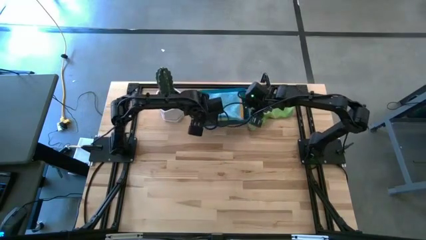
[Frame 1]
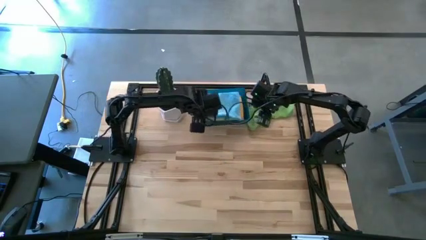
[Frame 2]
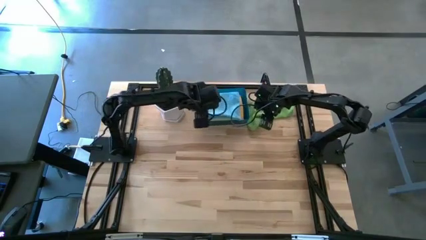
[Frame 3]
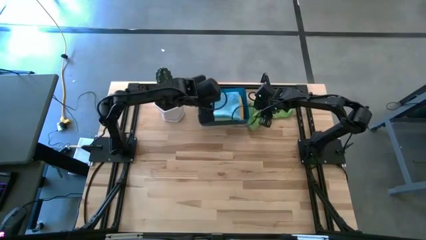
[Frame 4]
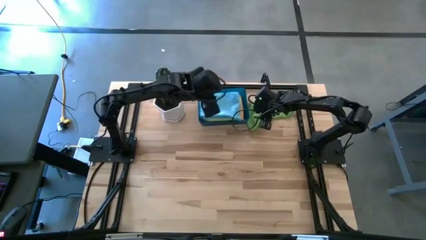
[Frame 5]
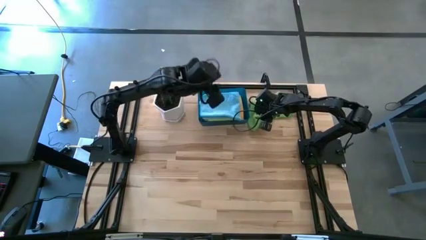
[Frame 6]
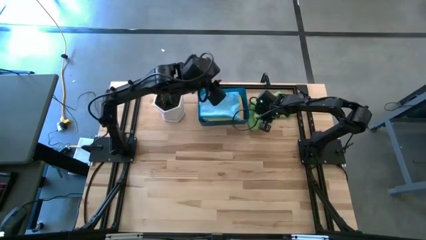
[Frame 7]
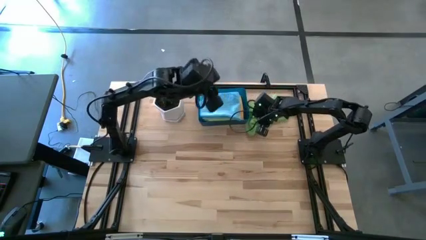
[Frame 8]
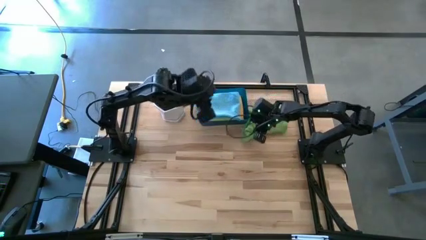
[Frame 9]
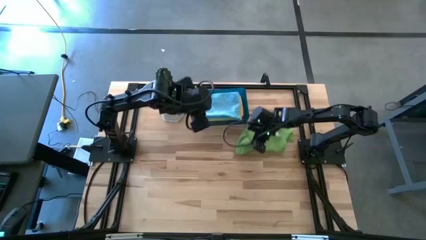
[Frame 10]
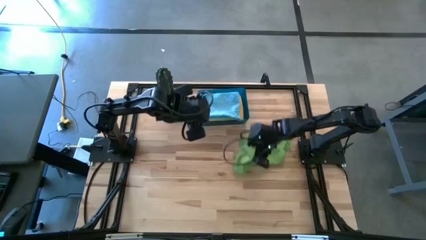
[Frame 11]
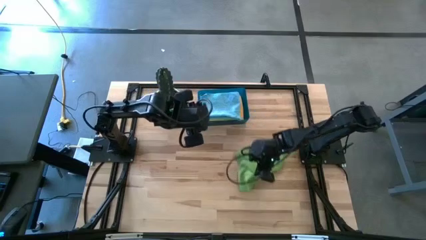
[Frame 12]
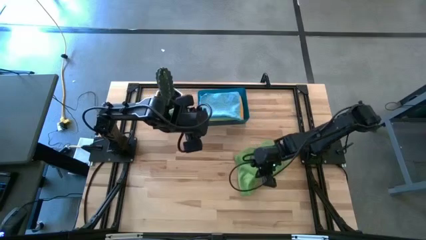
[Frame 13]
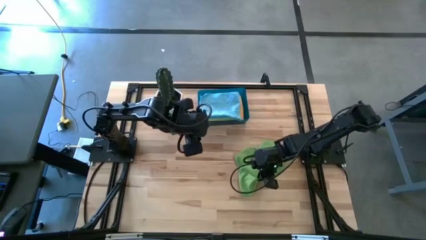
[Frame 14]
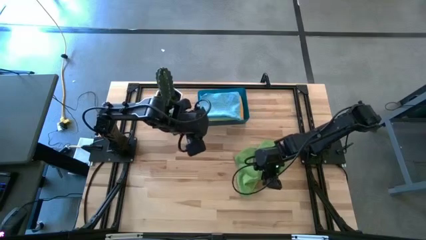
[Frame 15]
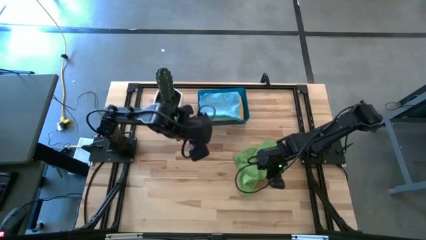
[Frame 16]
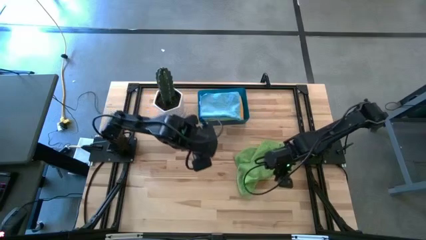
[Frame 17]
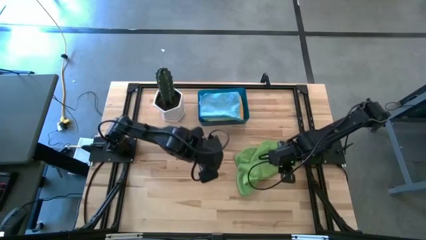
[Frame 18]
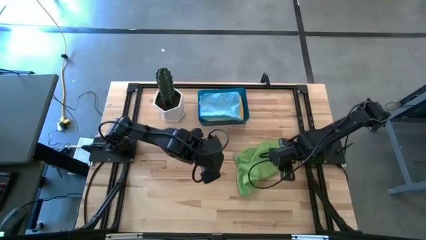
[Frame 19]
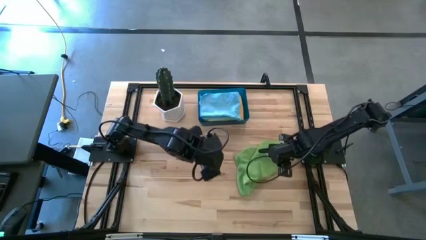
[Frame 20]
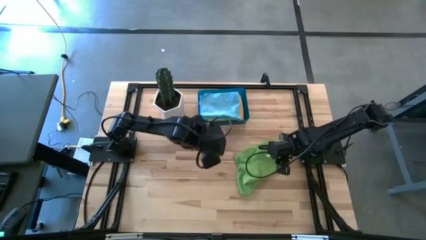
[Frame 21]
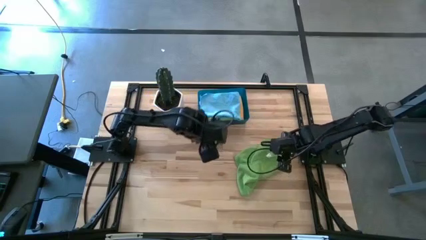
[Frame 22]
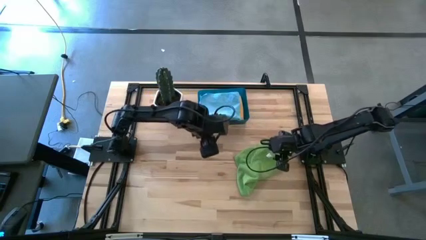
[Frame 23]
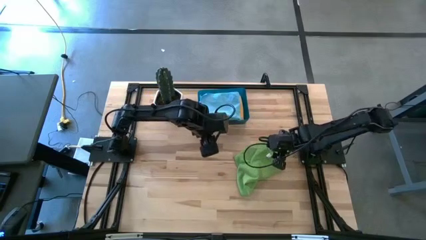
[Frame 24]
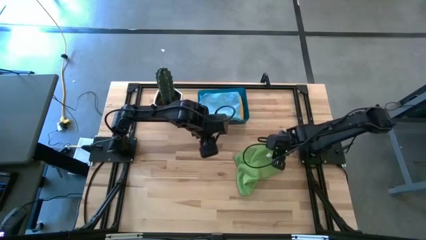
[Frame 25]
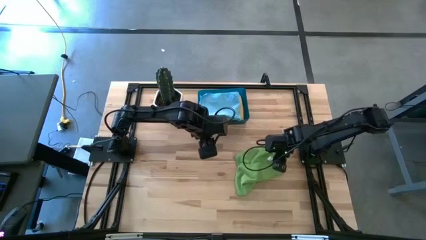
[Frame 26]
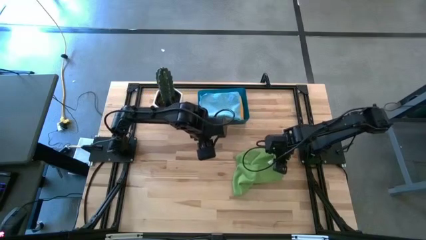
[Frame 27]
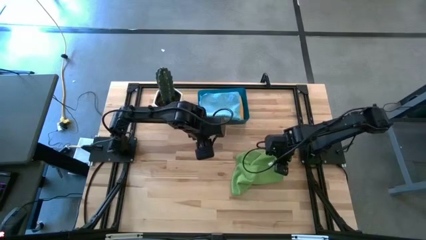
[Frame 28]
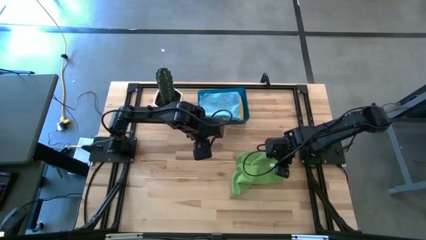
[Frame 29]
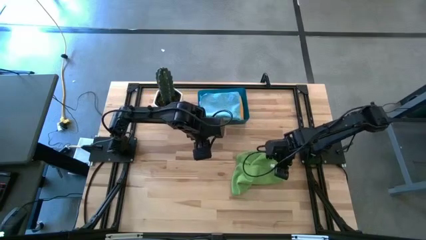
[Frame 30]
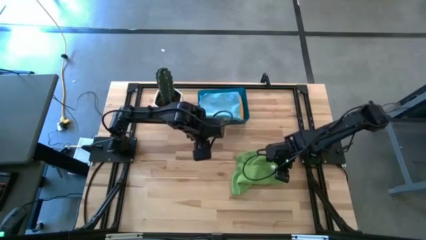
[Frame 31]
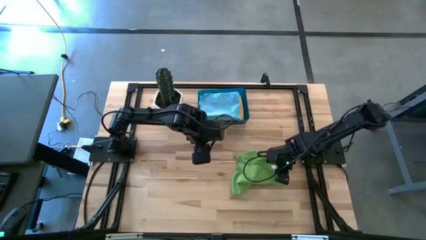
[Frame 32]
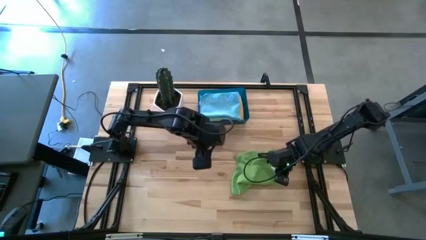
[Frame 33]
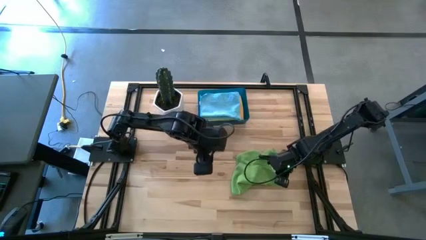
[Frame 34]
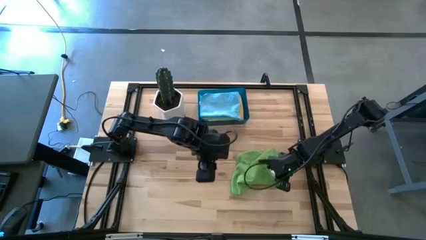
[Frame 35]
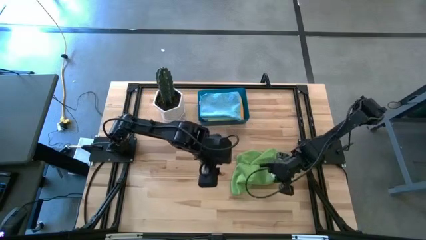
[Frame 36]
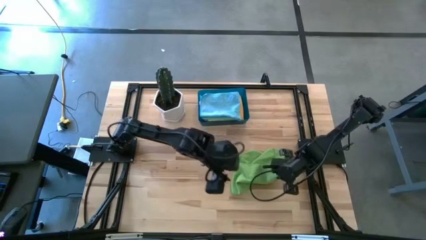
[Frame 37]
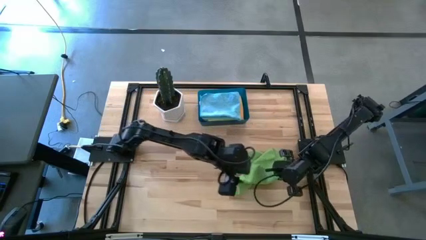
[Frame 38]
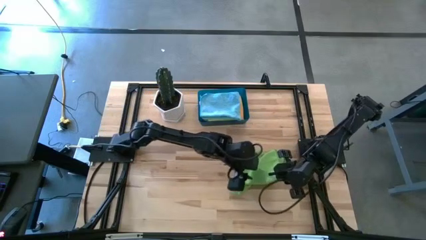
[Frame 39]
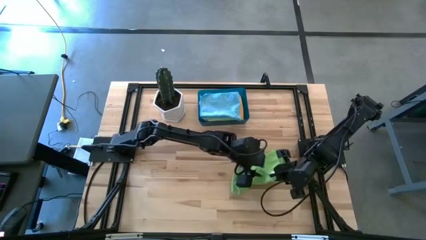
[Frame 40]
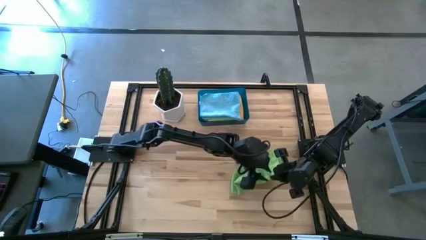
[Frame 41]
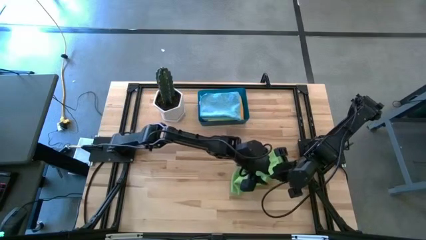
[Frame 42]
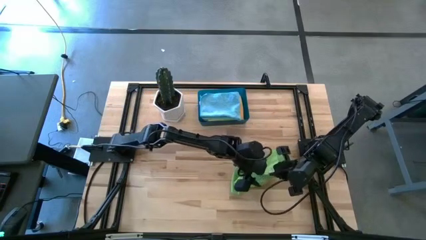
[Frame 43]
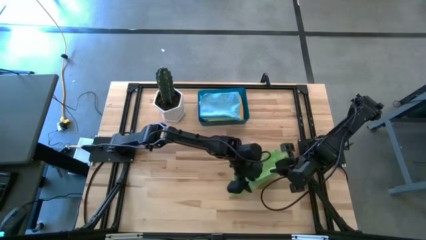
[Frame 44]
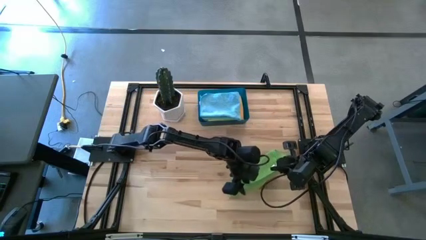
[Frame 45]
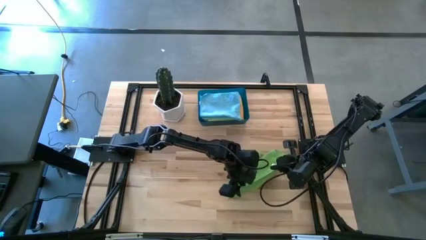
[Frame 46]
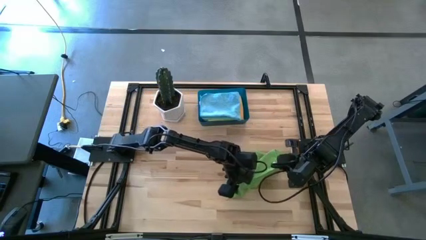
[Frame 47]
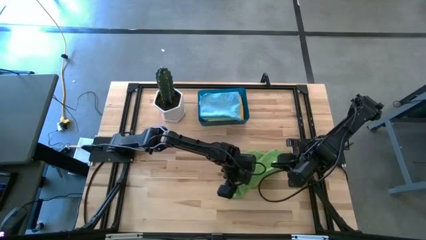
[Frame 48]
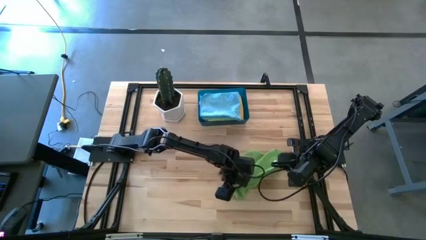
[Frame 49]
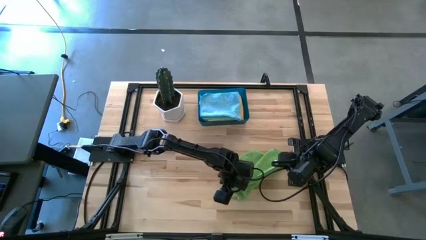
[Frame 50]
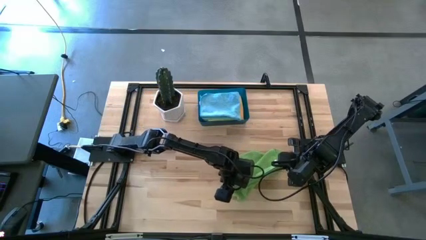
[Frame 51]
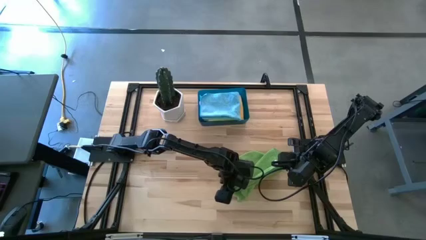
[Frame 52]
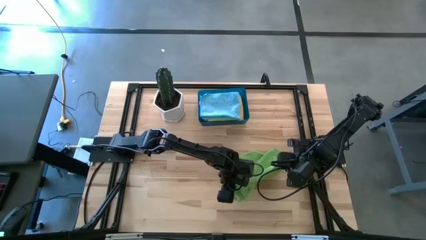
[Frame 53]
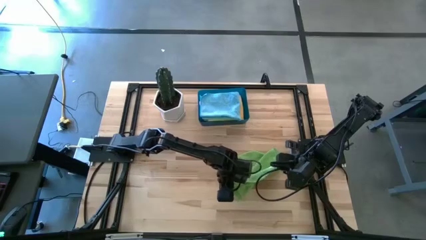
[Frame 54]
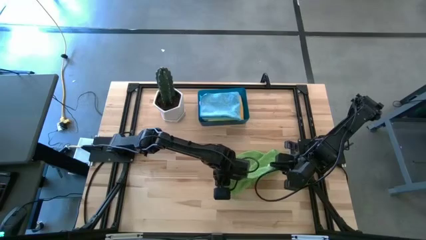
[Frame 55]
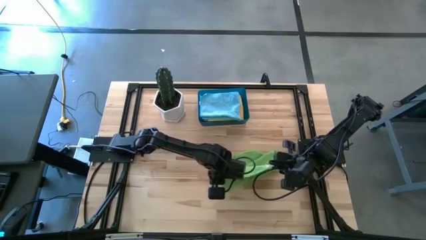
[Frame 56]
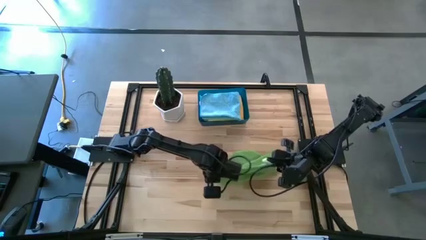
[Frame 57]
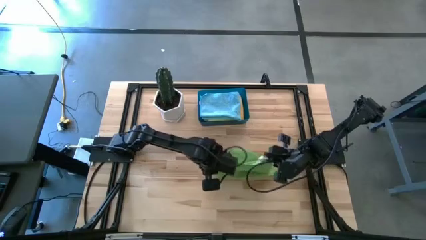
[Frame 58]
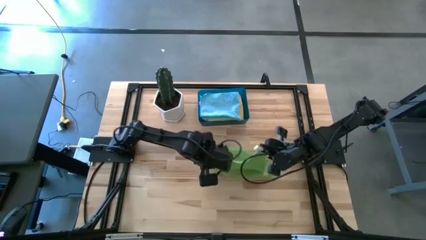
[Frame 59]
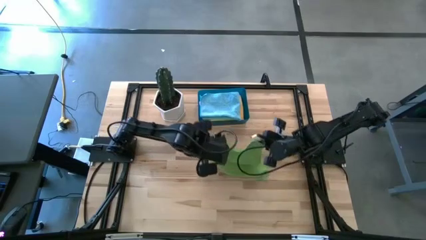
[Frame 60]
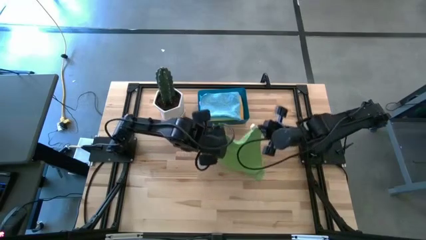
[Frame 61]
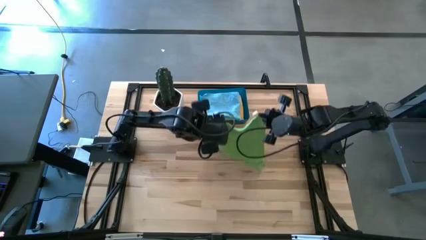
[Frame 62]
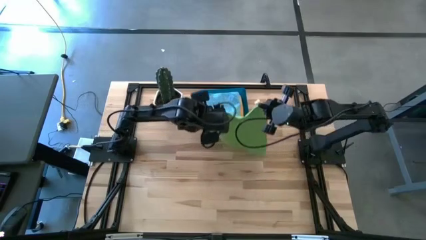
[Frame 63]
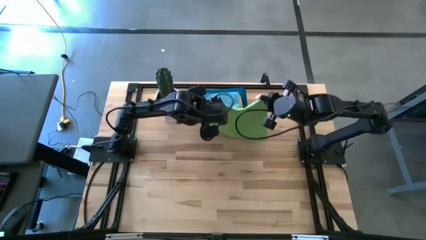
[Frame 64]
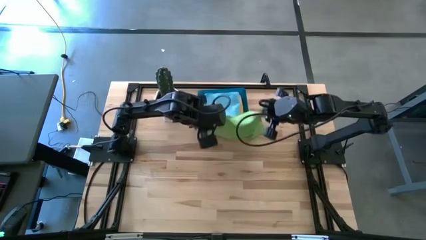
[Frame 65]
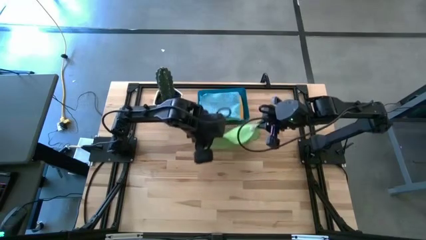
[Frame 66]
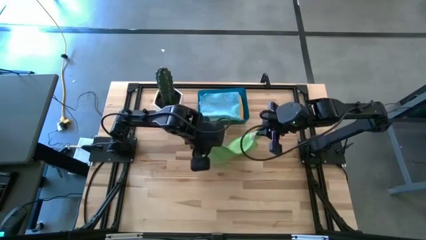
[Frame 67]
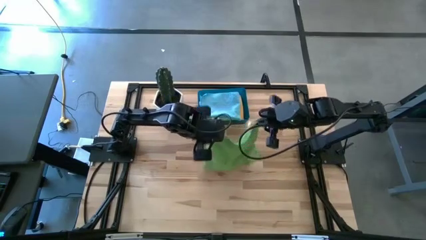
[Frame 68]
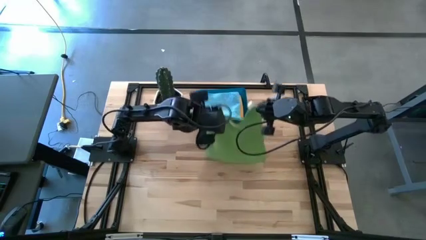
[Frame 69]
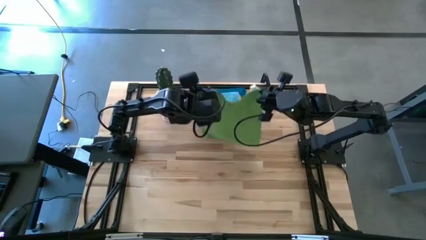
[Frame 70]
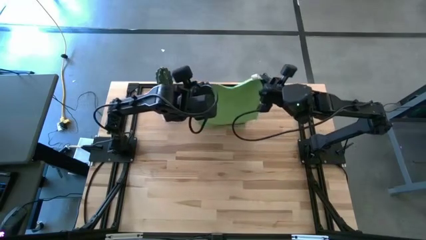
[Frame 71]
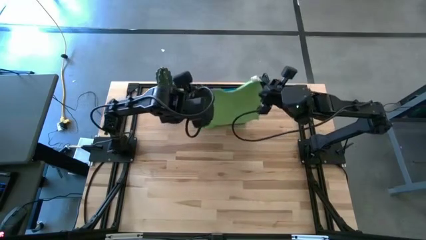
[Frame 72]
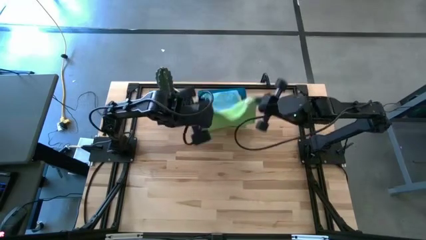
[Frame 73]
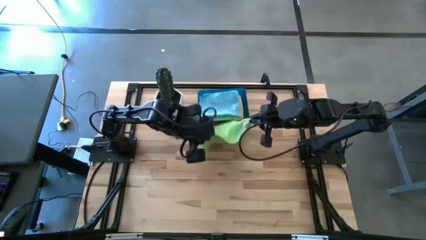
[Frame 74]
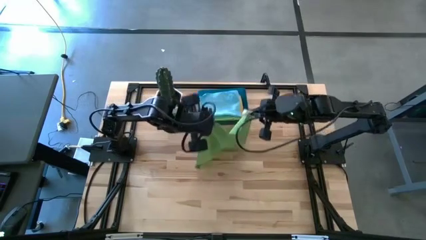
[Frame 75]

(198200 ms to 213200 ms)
Task: Fold microfiber towels
Fold the green microfiber towel
